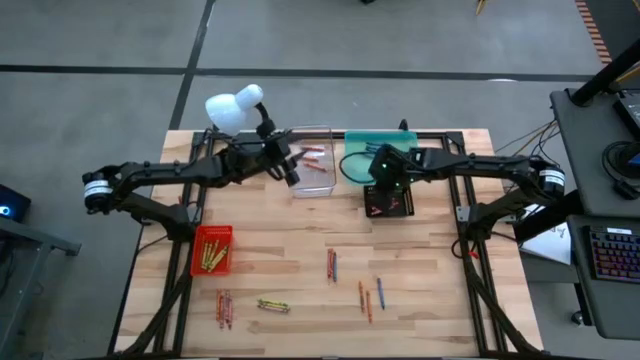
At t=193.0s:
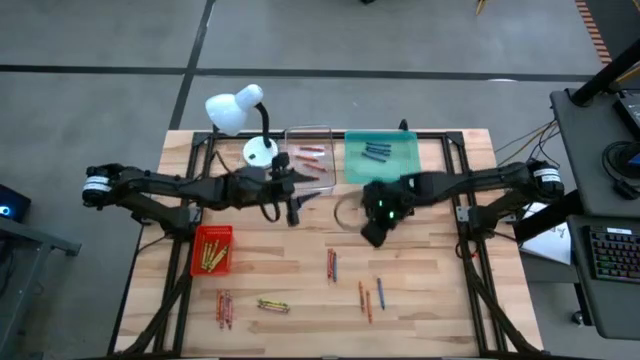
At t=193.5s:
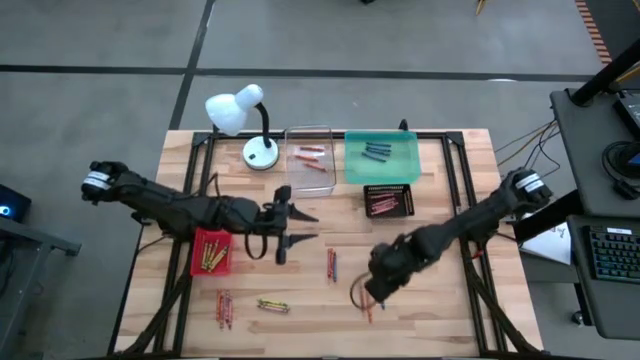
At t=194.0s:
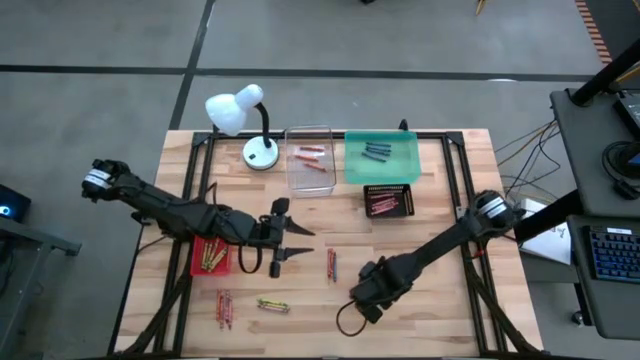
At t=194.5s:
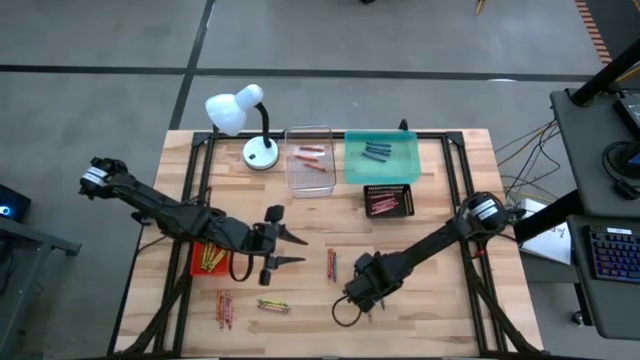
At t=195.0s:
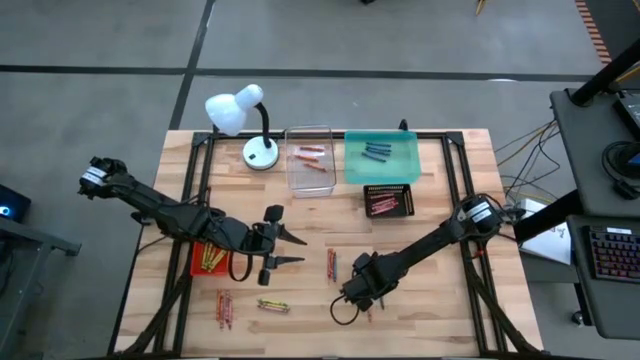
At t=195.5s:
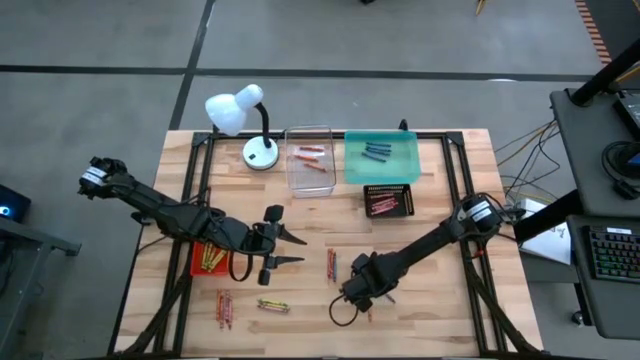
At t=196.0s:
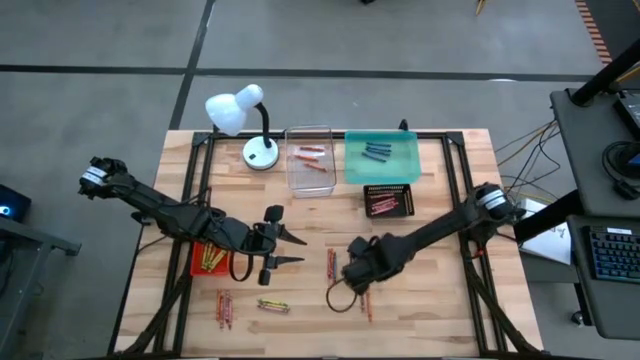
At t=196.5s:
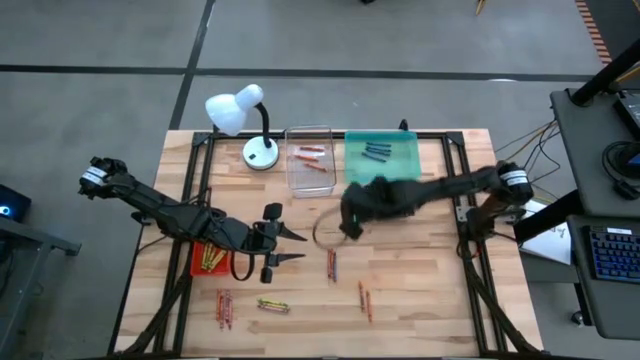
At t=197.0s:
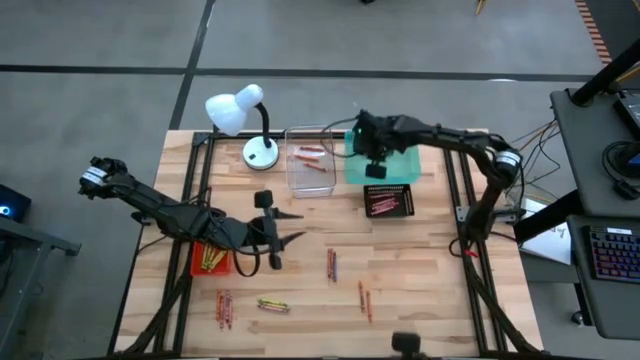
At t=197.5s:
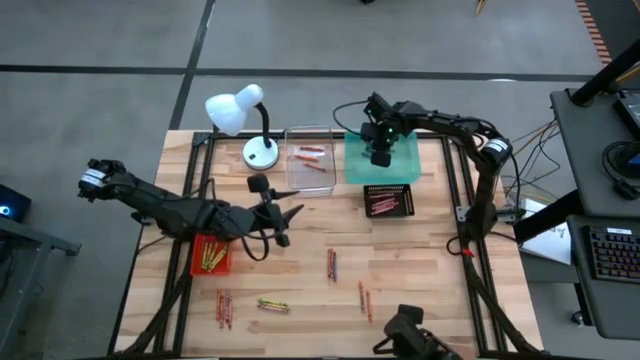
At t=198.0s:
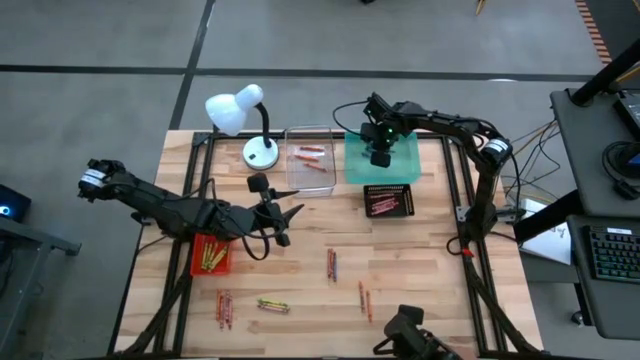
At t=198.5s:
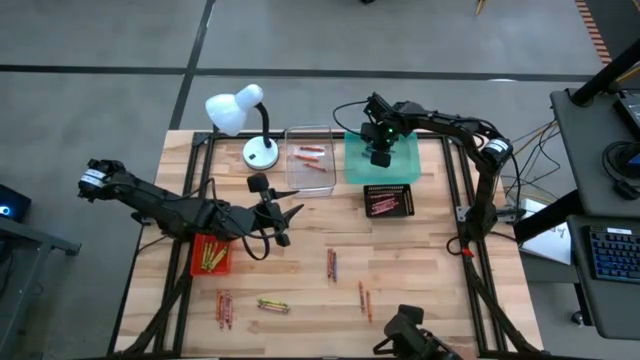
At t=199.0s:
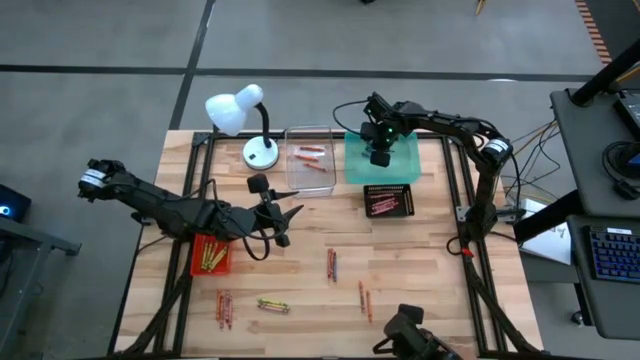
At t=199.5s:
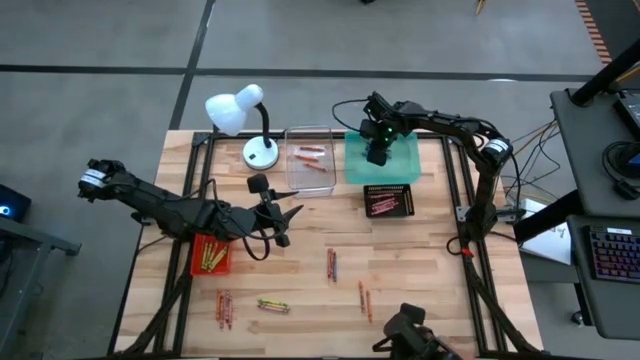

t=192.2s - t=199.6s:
Task: Sort crayons
Put the blue crayon into the blue bin

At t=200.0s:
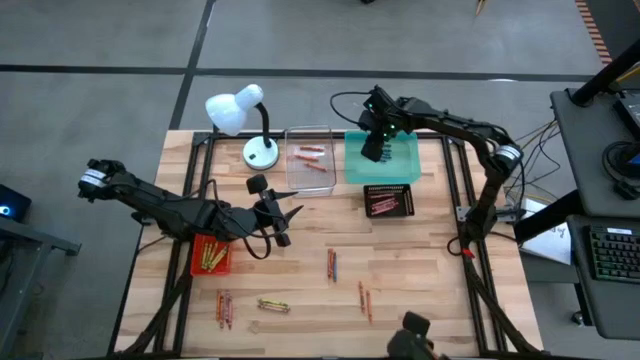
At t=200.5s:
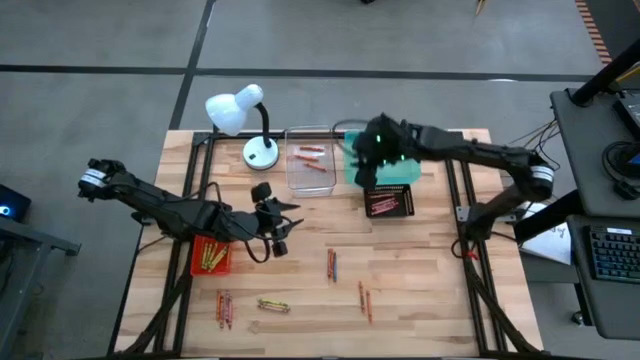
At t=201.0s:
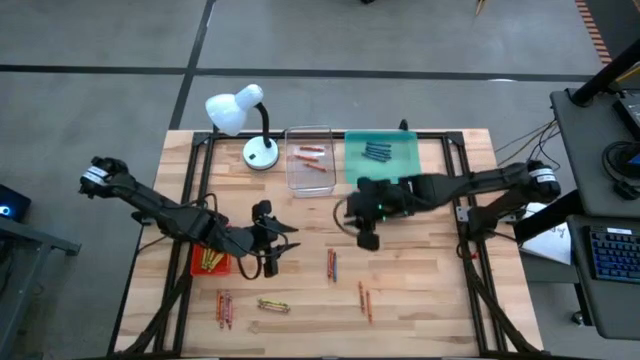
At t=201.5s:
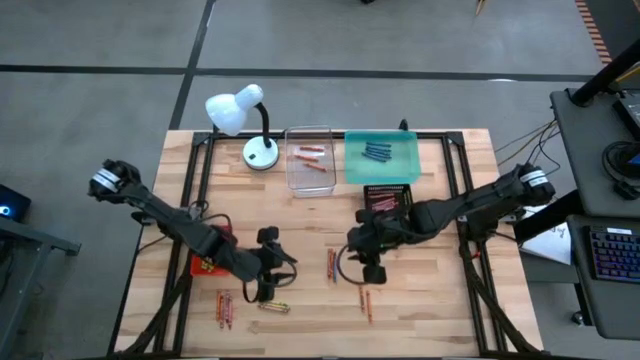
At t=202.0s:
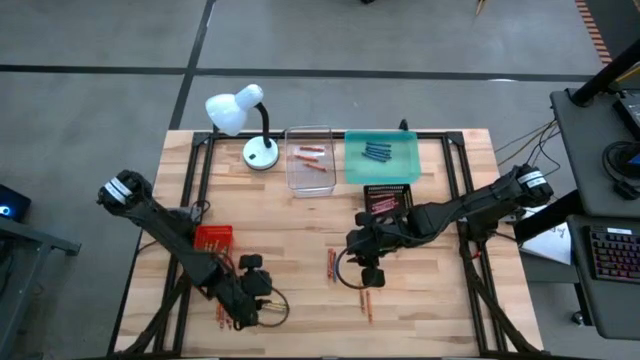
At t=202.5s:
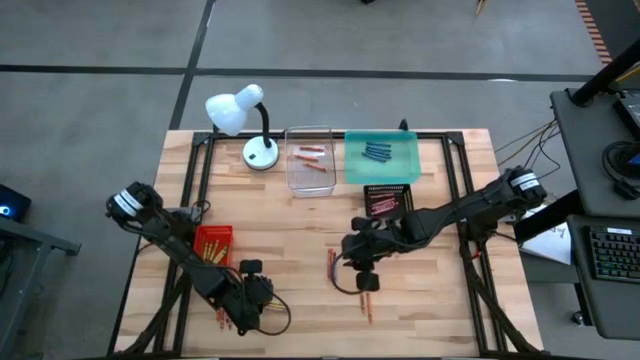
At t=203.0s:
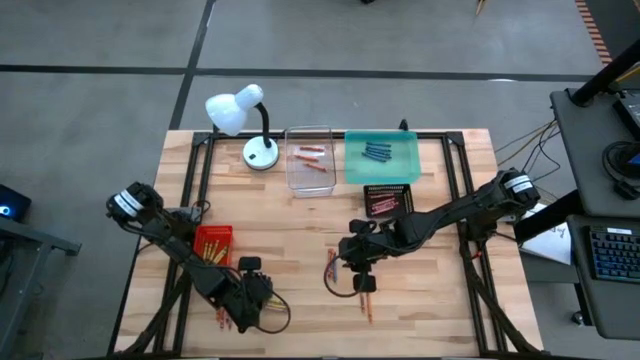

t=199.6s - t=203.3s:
Put the green crayon into the orange bin

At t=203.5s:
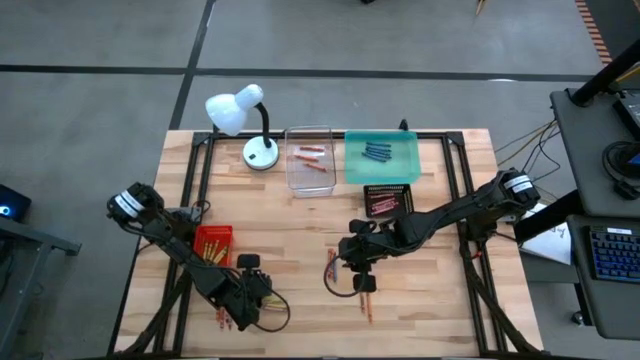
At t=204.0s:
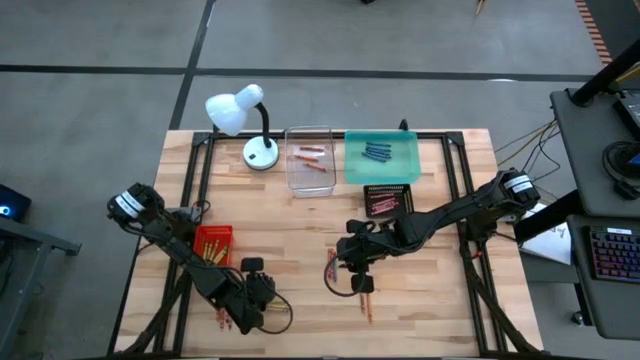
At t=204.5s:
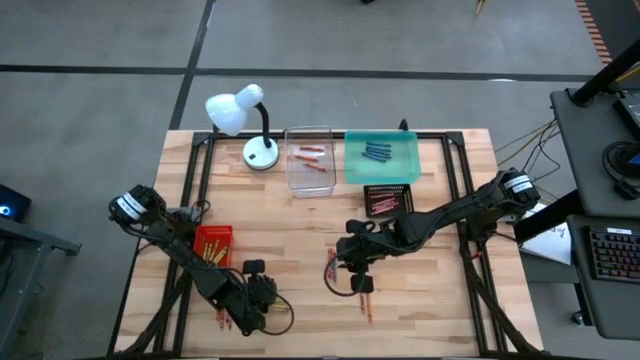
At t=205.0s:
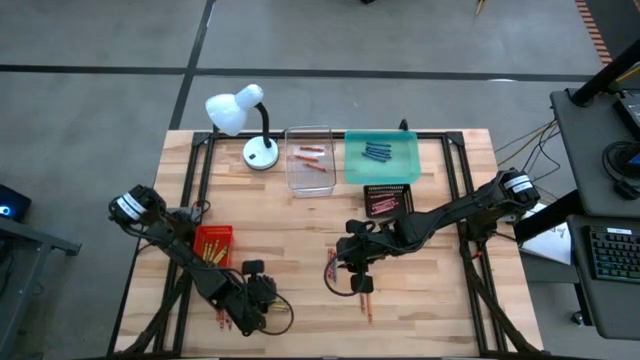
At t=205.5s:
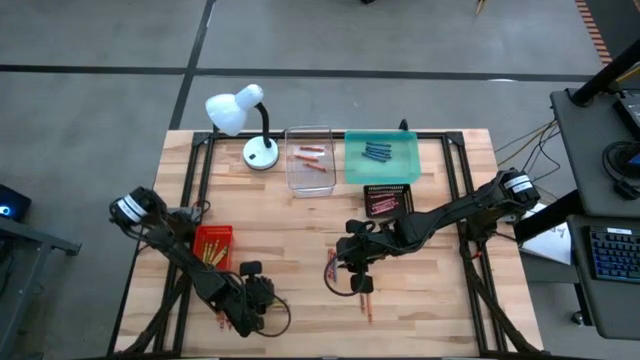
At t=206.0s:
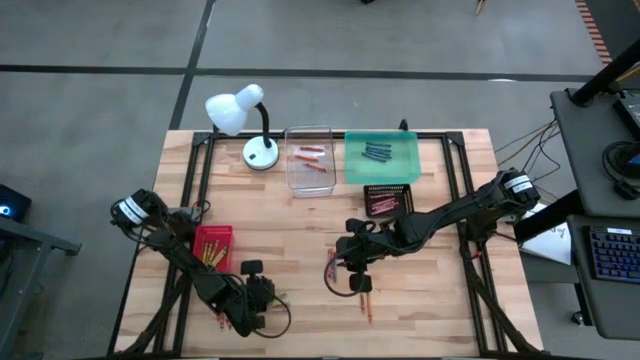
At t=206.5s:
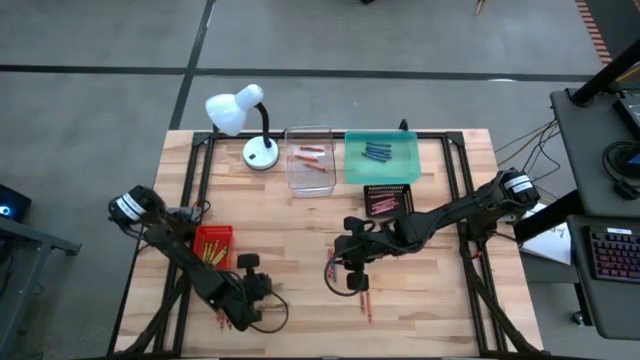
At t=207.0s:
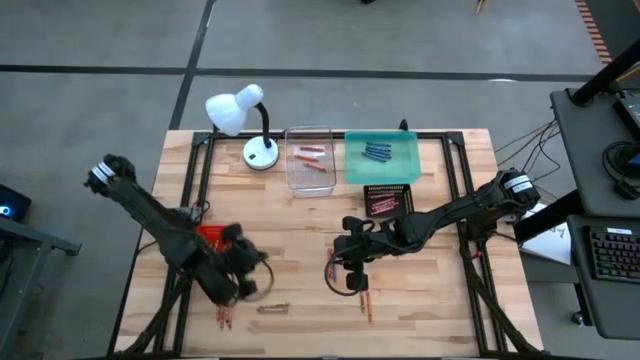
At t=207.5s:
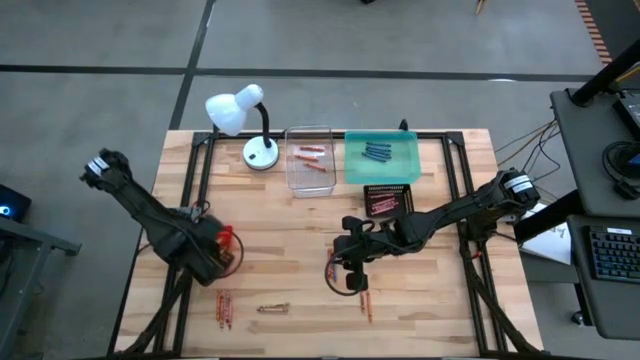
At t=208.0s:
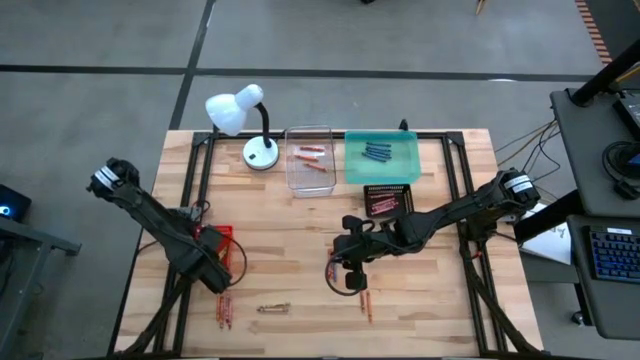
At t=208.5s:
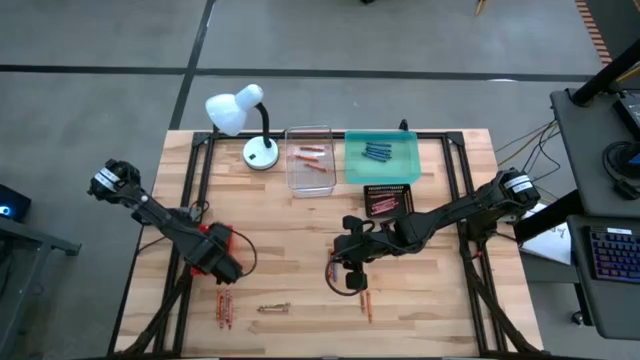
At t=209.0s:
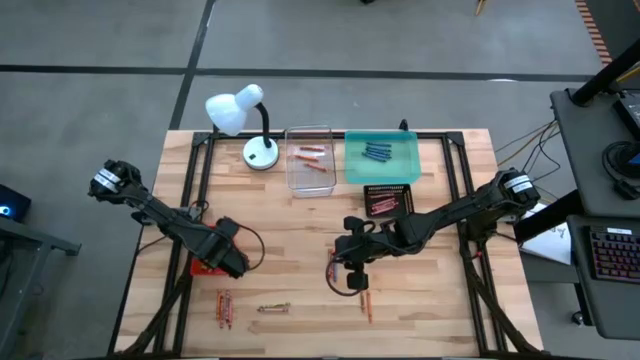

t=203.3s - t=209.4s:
Put the green crayon into the orange bin

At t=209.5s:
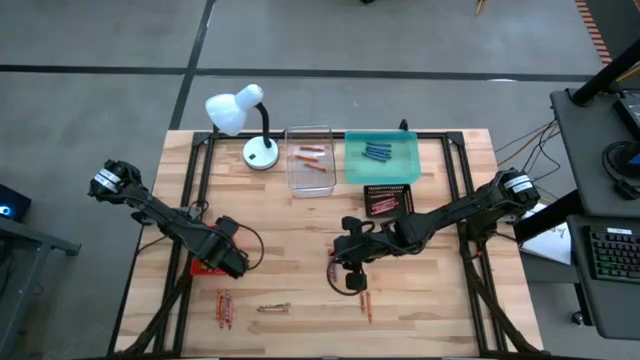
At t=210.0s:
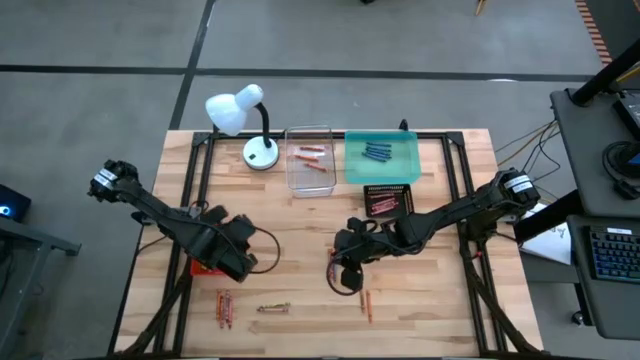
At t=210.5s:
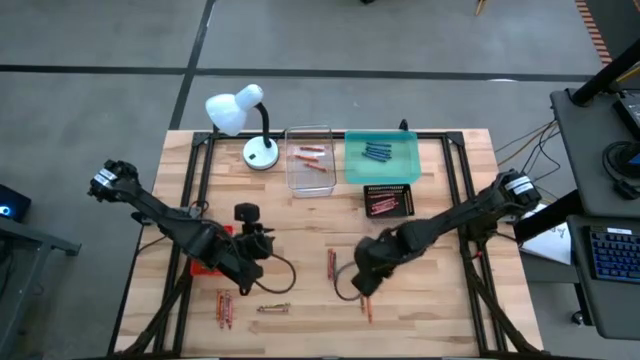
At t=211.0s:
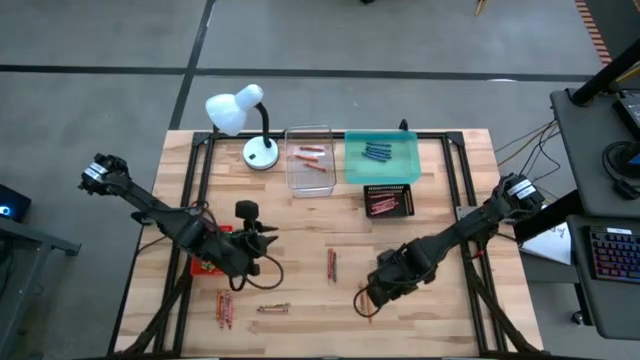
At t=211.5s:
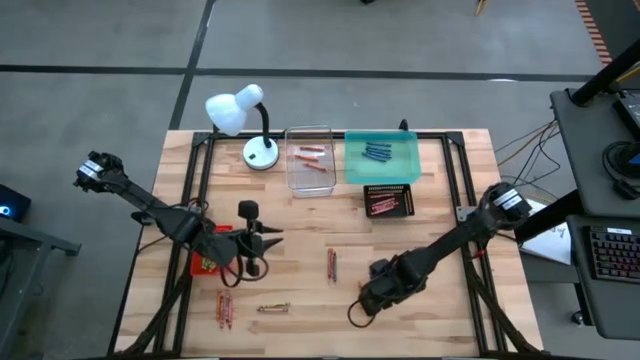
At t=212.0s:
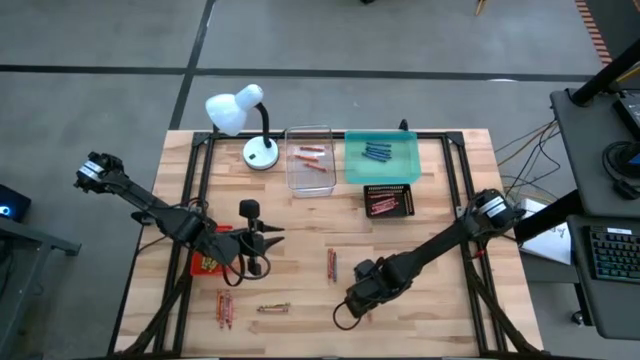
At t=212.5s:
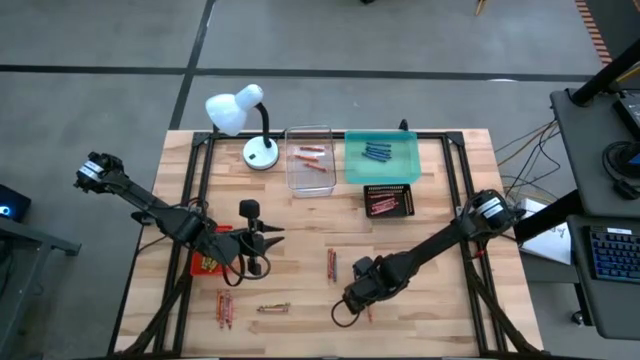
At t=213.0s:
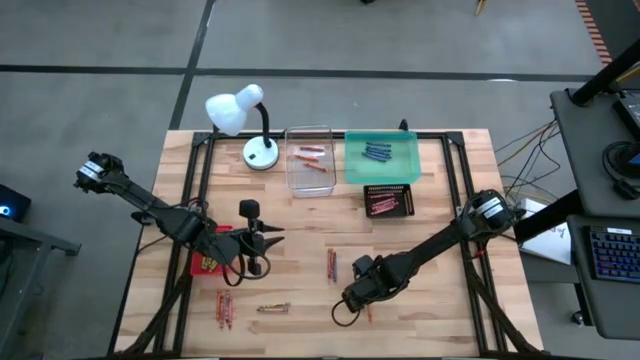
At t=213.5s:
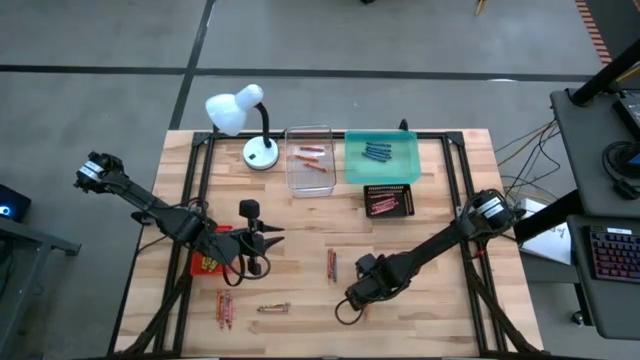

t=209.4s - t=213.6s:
Put the orange bin into the transparent bin
